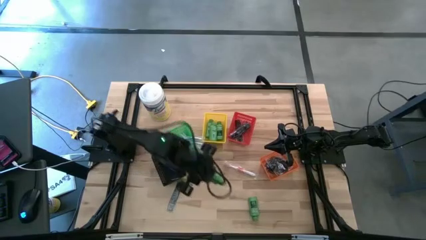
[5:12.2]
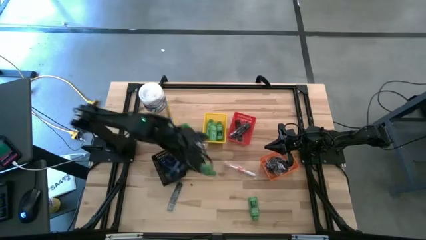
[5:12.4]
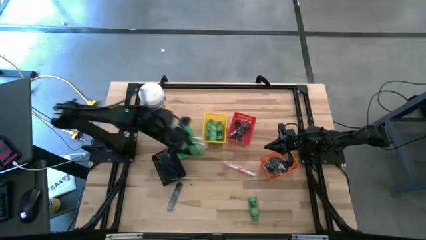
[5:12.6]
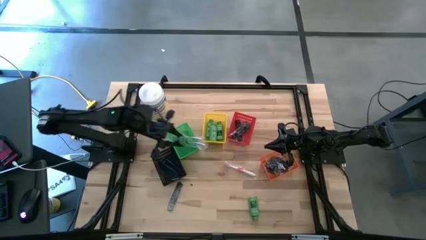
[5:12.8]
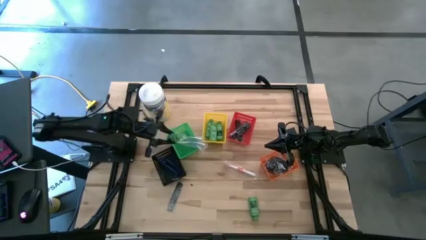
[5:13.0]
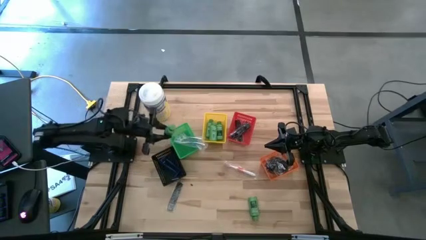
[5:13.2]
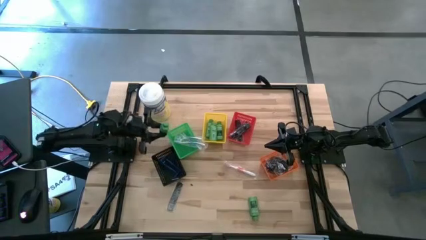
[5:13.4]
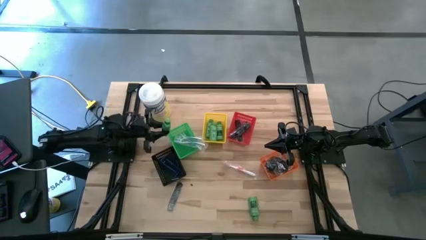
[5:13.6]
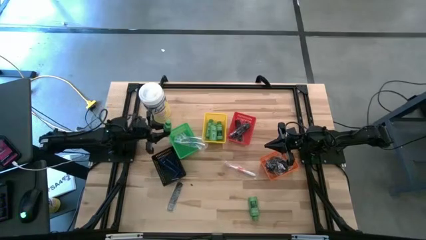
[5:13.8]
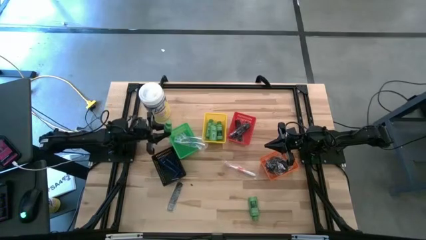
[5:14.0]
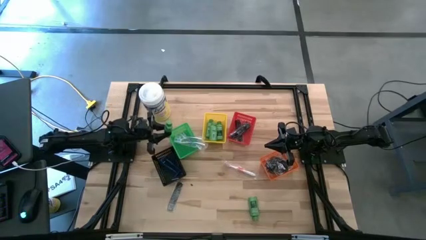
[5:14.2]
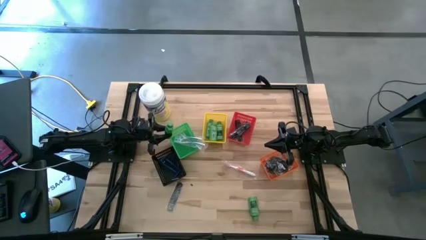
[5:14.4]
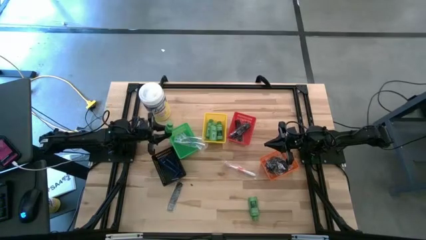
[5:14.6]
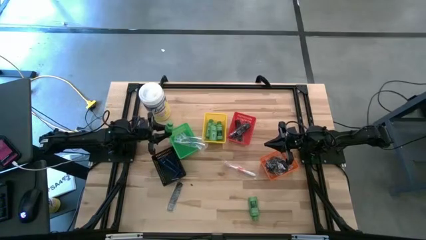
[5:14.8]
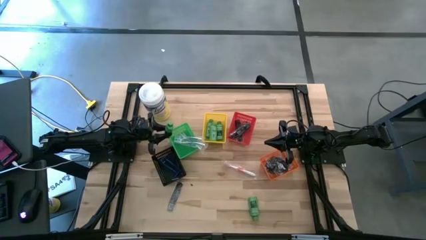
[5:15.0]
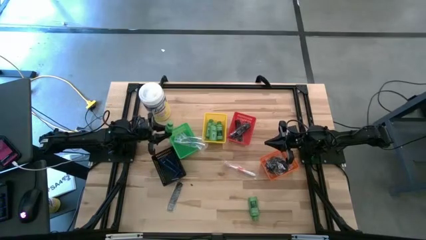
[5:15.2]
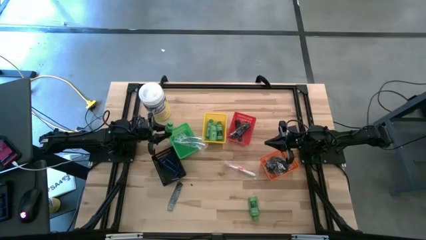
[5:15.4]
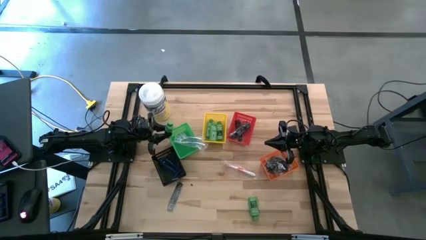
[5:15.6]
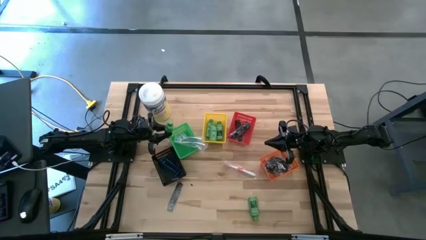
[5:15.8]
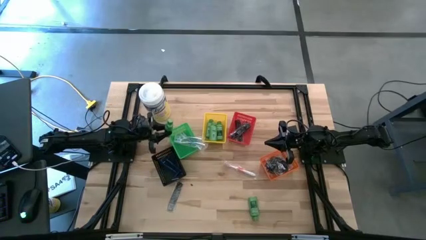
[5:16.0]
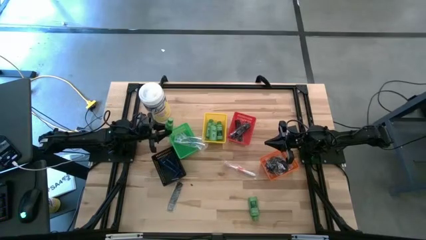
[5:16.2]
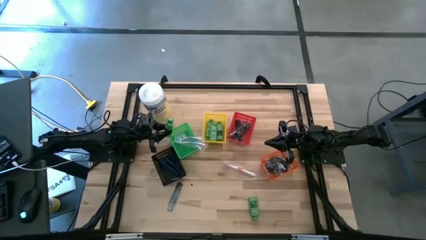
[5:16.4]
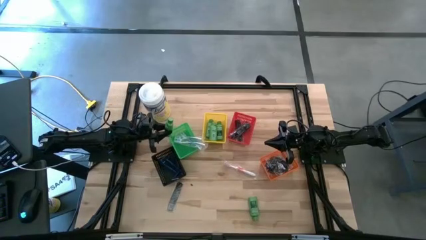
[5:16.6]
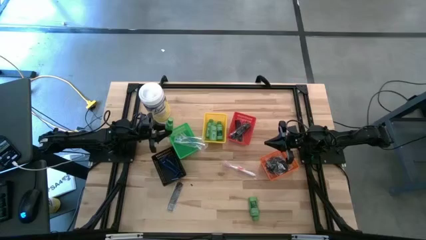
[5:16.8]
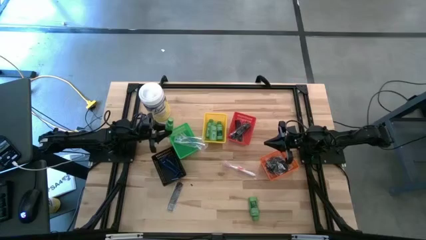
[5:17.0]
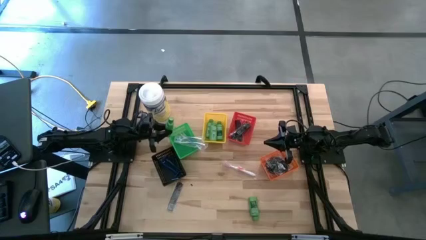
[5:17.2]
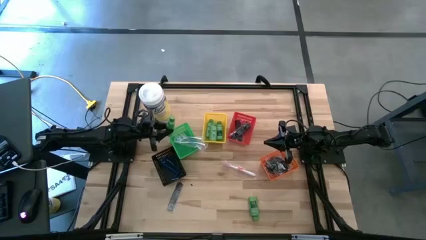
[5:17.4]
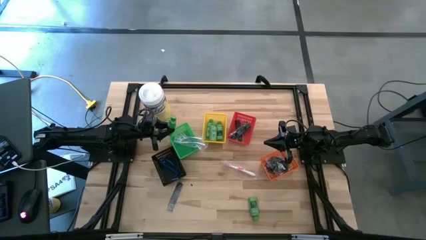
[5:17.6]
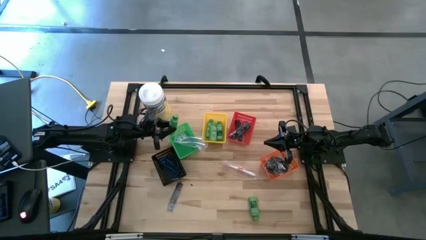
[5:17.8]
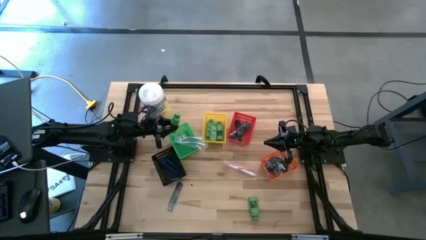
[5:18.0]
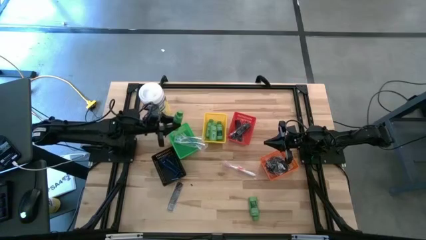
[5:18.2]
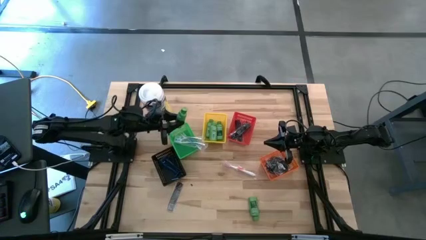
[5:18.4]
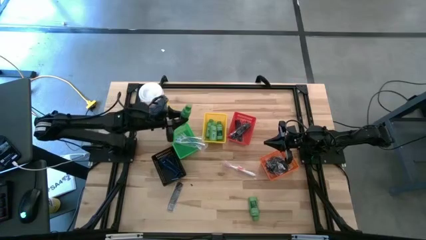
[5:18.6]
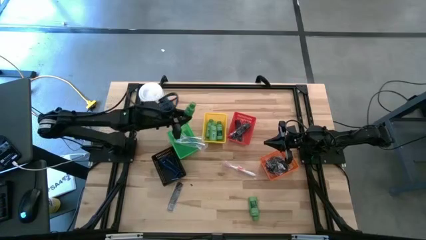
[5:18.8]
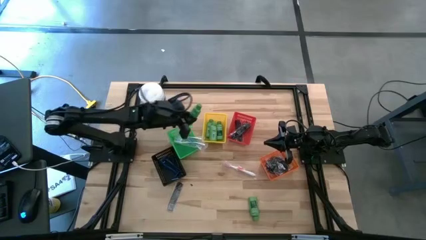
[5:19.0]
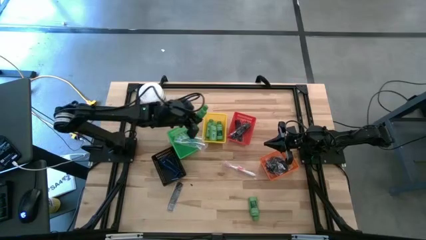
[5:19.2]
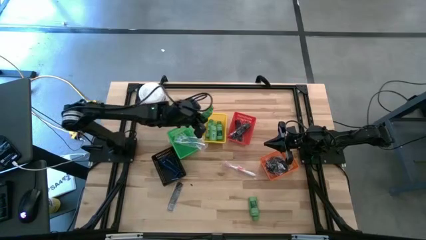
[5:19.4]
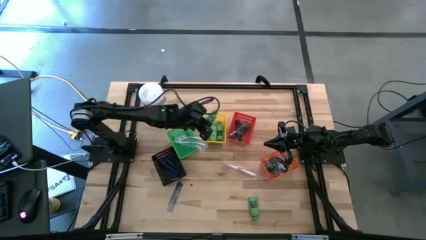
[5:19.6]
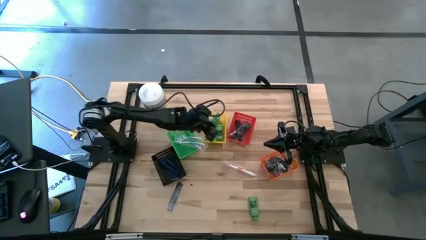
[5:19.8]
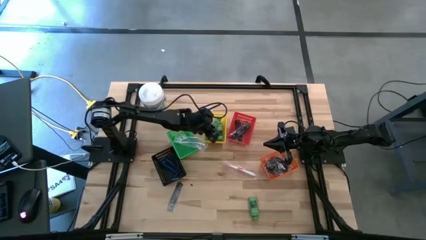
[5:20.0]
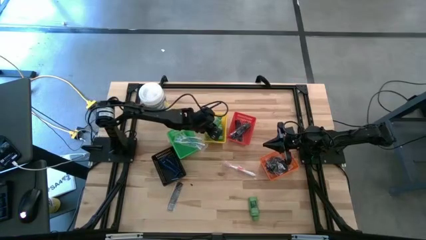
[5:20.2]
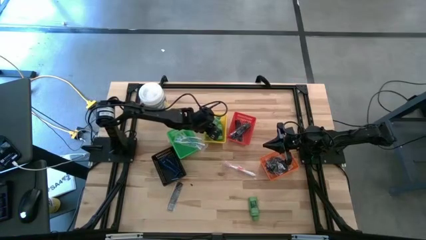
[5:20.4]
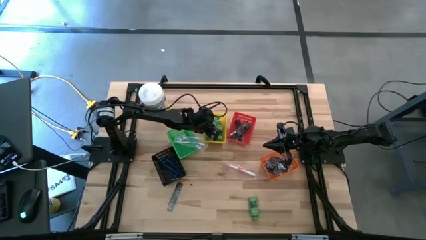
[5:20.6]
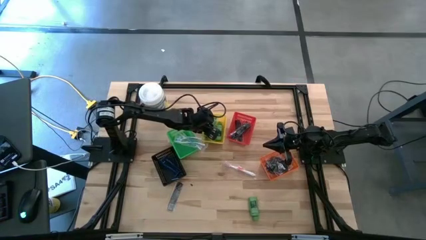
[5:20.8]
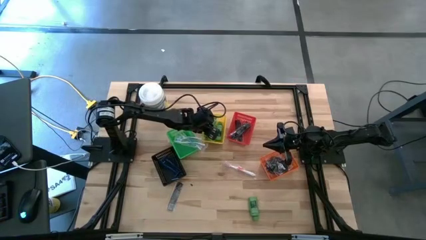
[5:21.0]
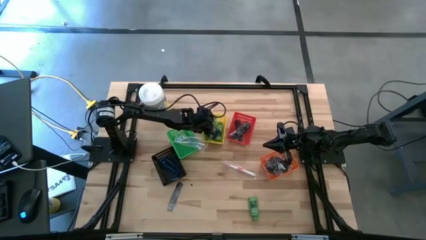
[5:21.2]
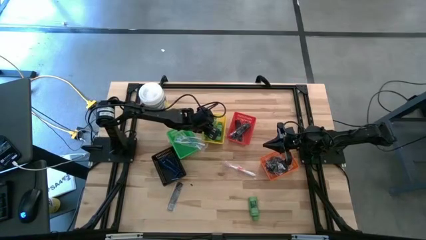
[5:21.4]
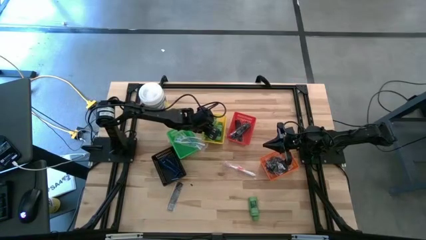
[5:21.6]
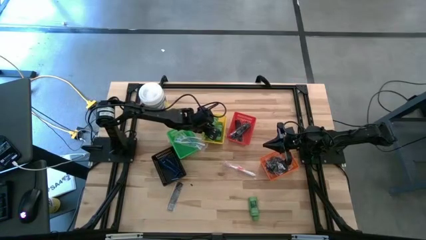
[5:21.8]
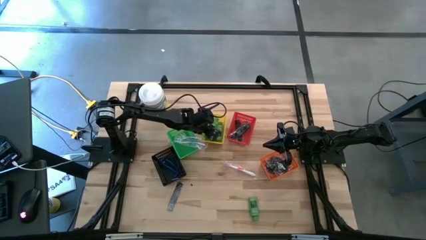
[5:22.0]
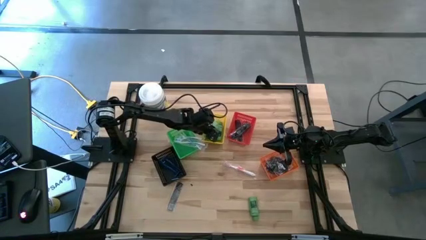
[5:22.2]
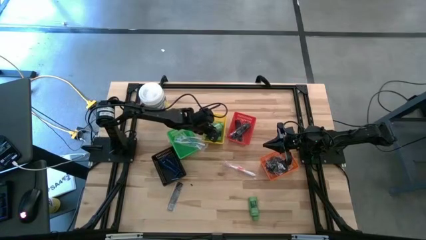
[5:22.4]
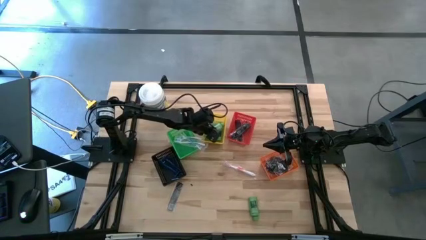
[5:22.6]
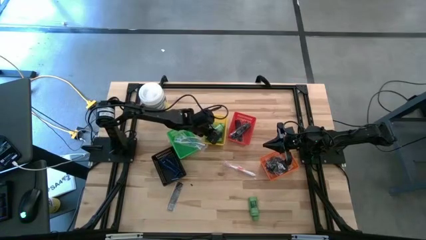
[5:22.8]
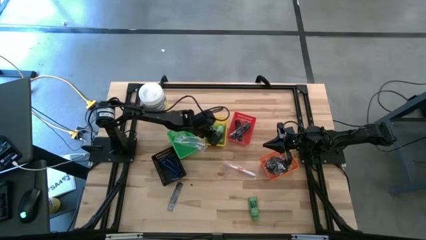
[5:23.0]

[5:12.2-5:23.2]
Task: Pick & Place Travel size toiletries
Put the green shampoo into the yellow bin
